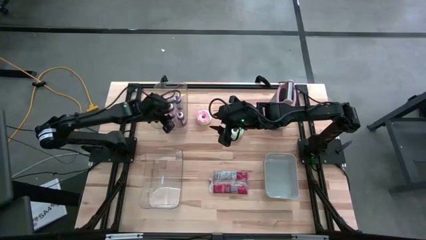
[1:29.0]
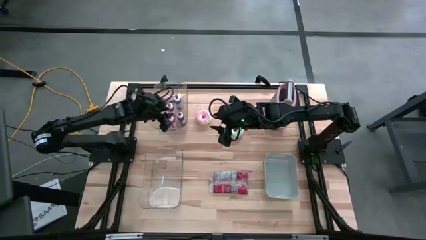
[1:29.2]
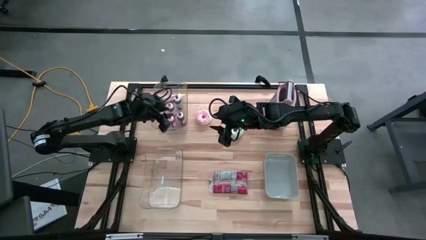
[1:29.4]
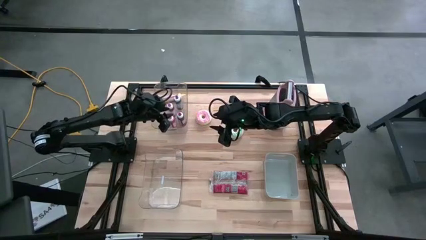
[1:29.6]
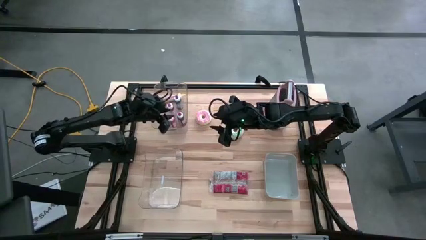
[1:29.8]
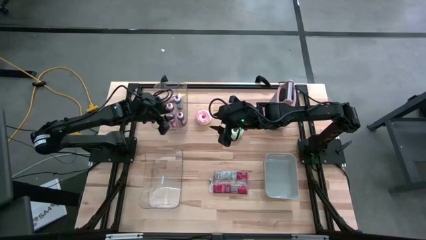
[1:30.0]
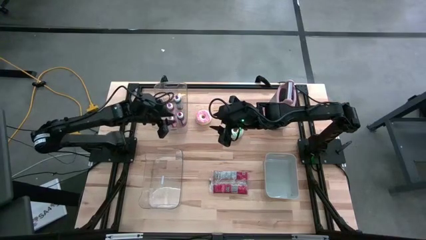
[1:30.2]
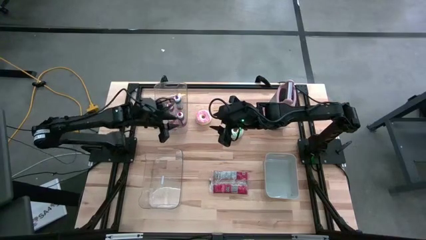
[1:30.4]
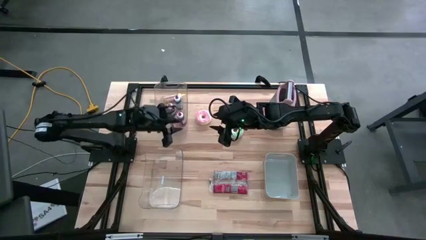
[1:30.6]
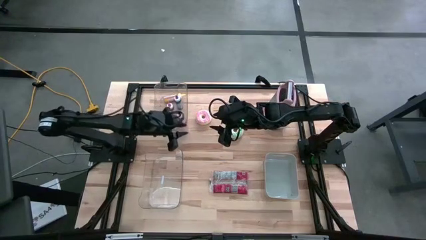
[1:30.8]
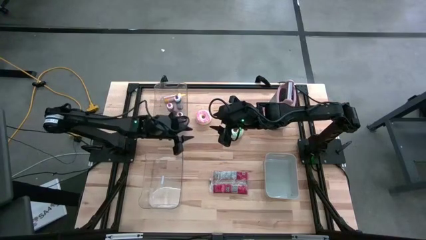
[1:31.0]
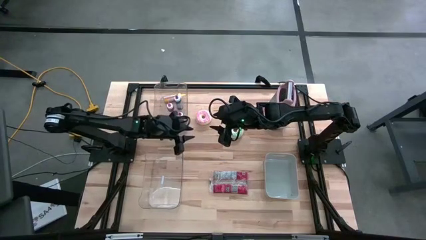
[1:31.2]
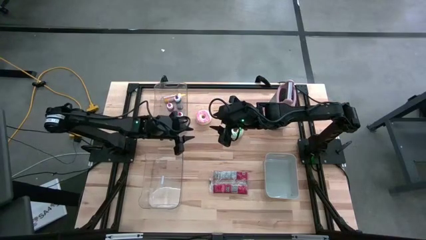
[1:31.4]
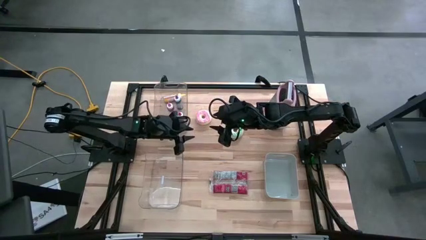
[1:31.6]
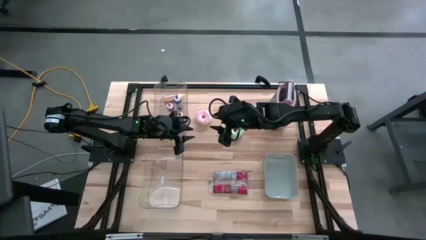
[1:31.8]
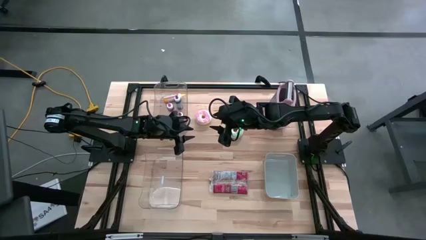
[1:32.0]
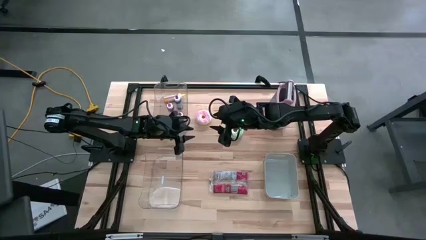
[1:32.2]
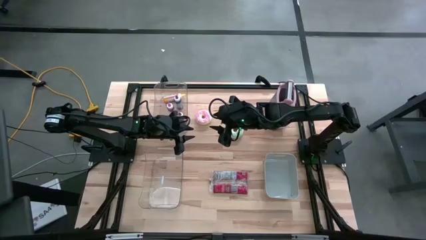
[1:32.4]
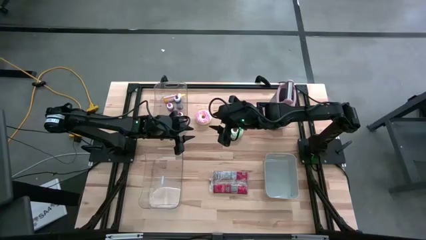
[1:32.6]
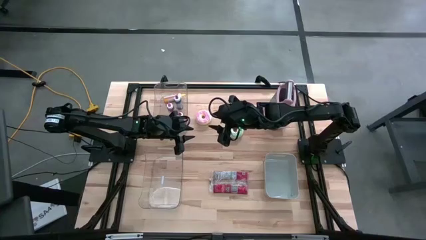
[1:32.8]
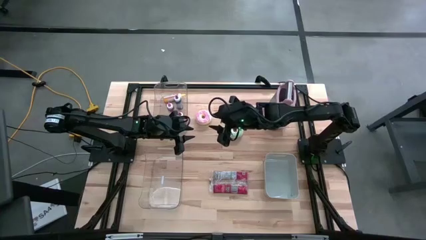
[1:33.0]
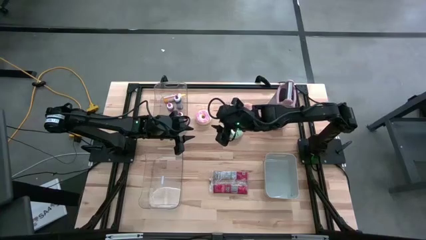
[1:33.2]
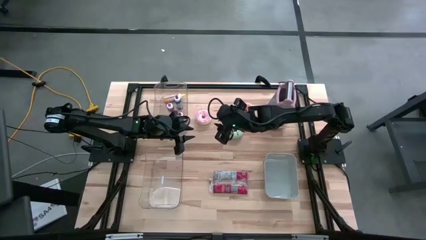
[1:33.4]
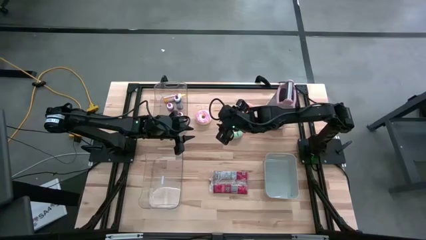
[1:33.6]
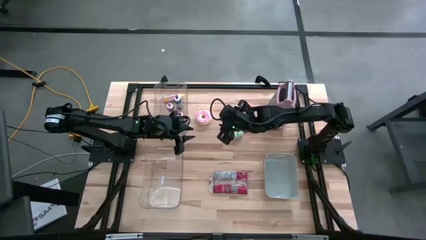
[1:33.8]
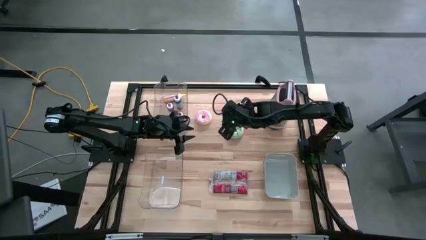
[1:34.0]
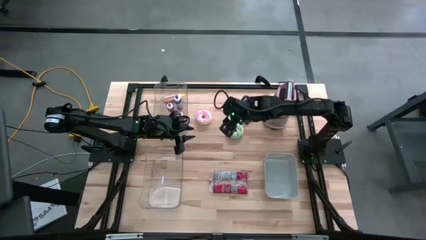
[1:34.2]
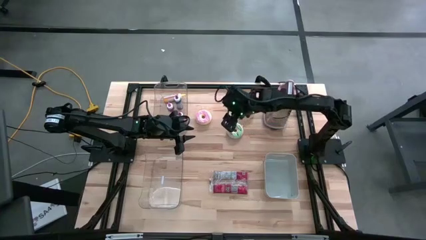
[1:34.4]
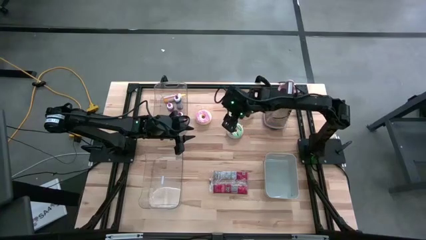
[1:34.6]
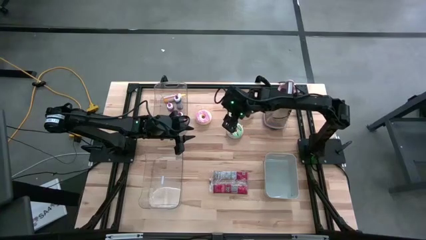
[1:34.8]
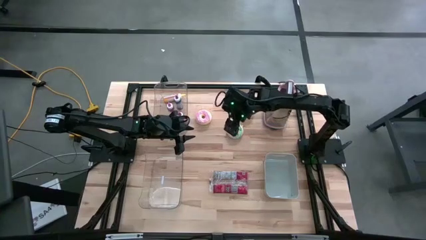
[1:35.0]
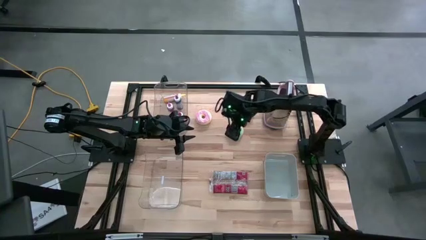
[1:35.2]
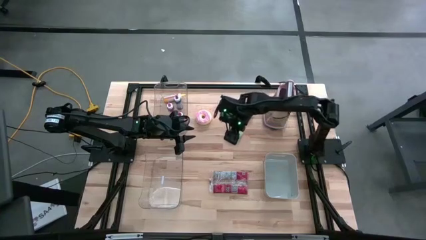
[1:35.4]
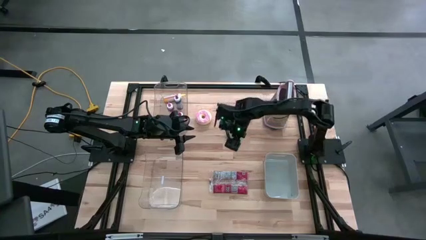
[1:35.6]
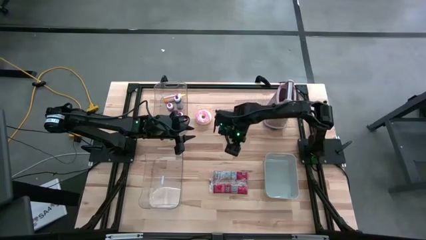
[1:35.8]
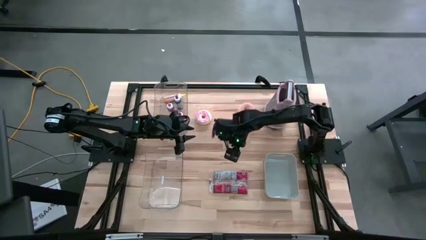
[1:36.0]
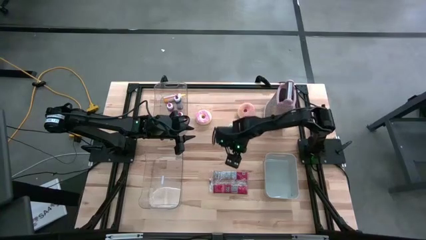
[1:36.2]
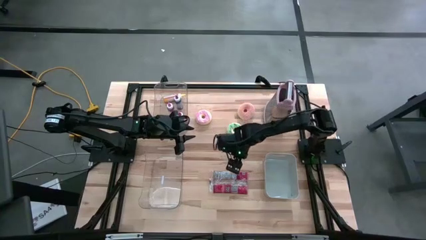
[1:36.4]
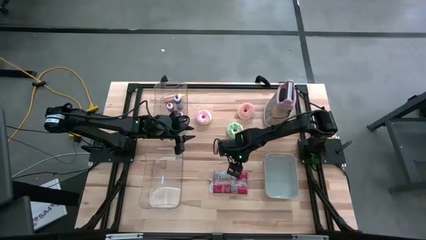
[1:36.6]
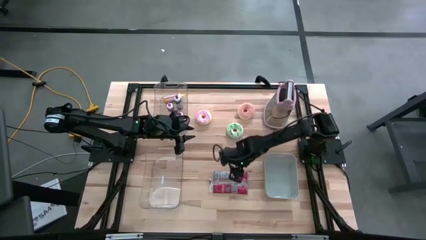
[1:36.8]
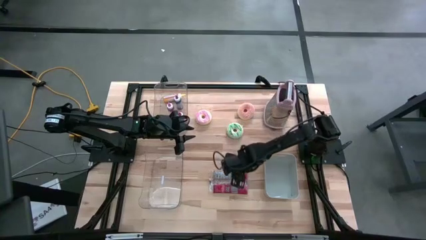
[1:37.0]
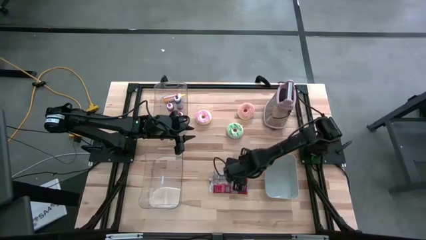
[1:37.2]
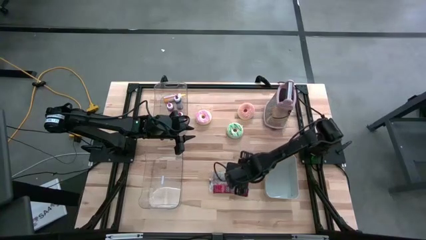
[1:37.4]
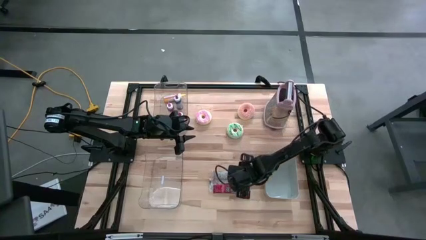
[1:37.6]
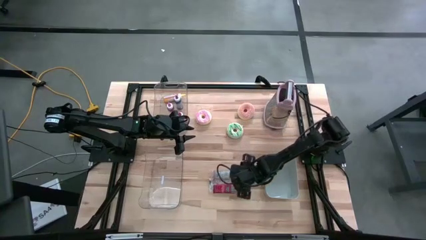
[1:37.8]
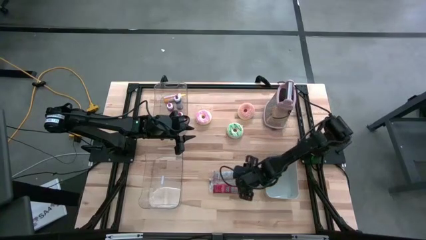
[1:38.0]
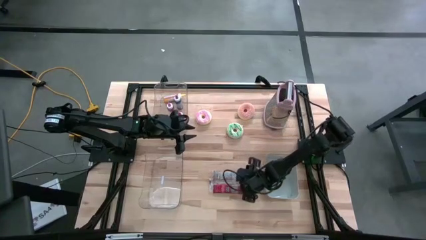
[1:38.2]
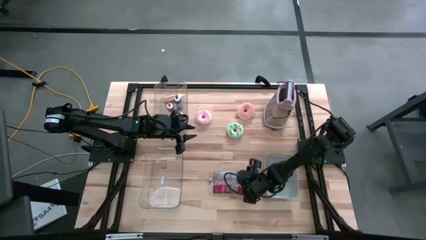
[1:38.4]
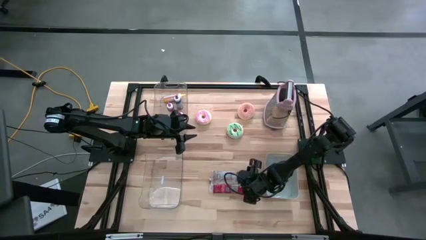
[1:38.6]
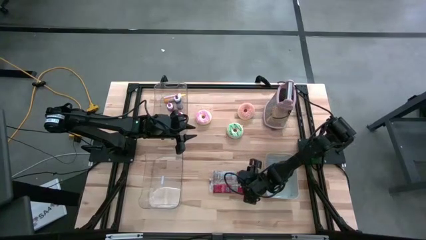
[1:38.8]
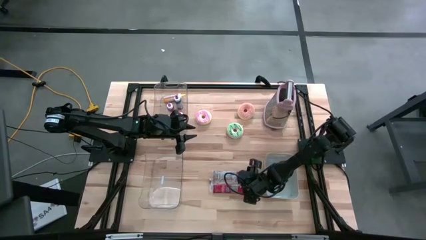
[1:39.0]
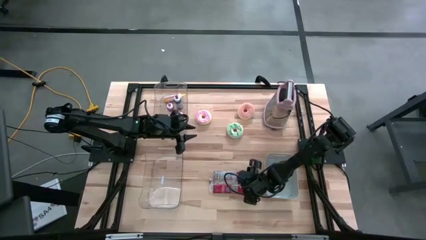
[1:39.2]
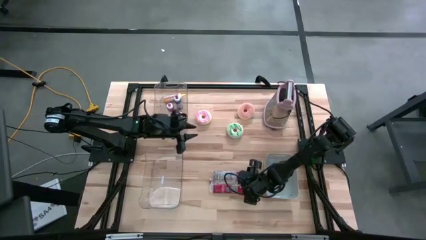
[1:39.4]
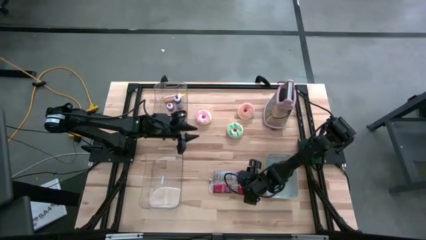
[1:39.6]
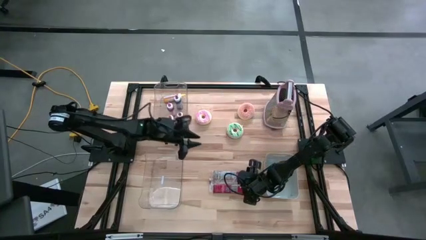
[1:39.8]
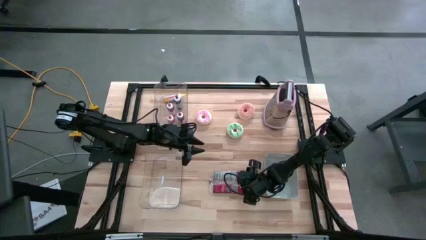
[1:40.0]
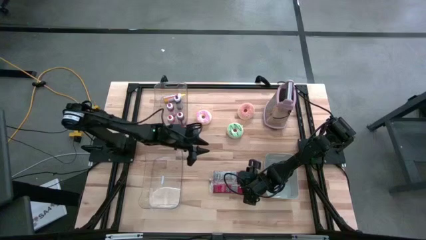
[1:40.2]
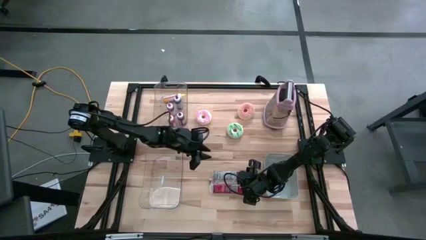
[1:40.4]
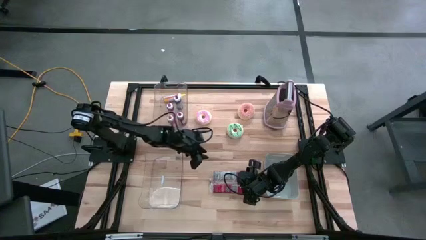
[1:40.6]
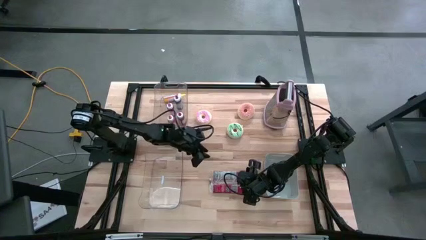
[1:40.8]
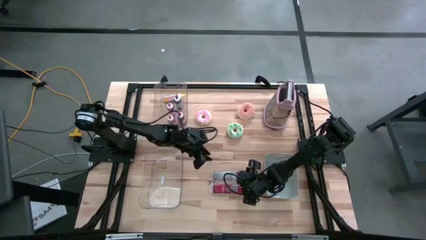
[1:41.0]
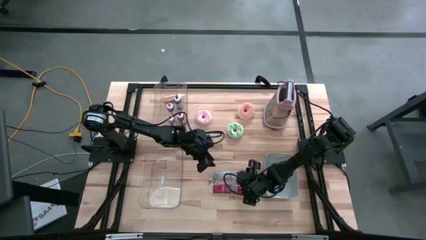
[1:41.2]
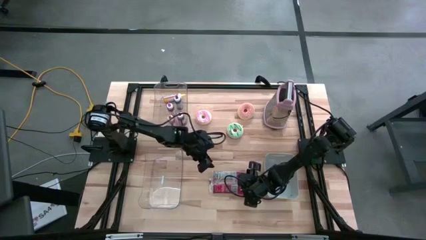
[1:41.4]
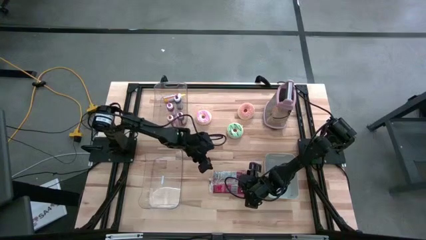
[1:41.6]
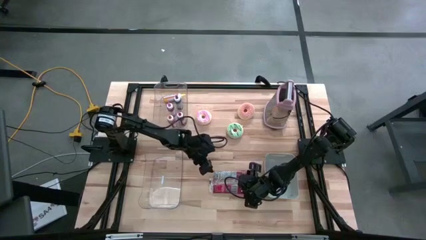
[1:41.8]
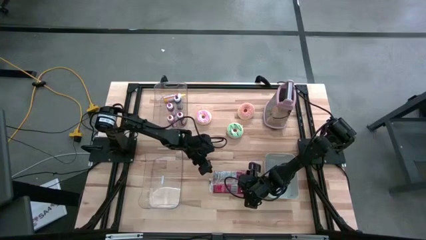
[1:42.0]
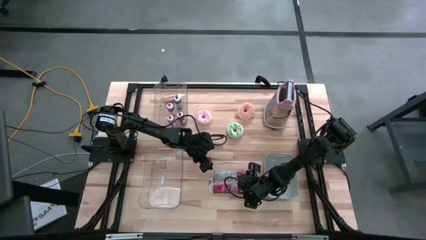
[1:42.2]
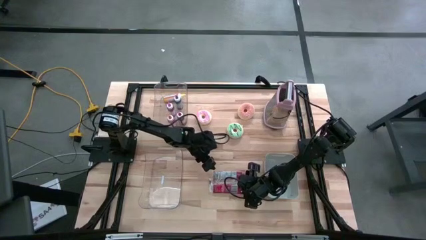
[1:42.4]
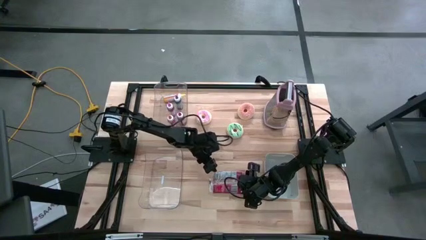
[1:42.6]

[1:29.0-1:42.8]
Put the red popcorn bag into the bottom transparent bin
